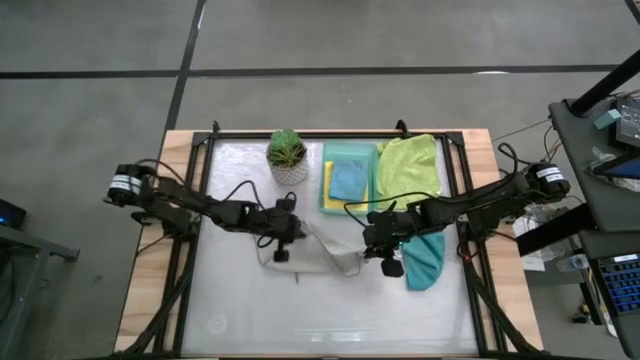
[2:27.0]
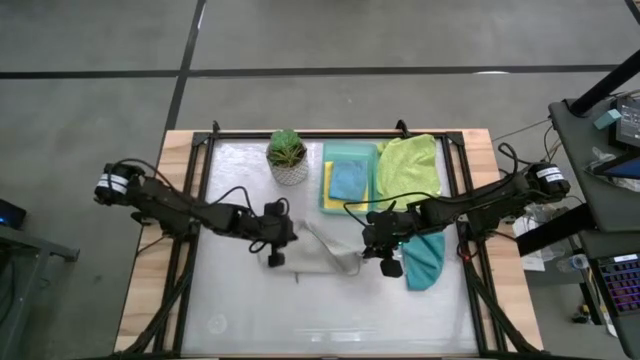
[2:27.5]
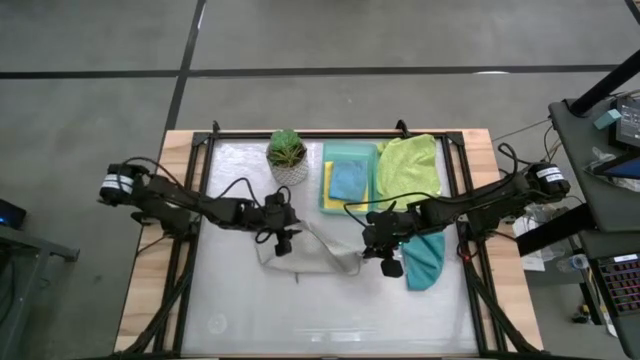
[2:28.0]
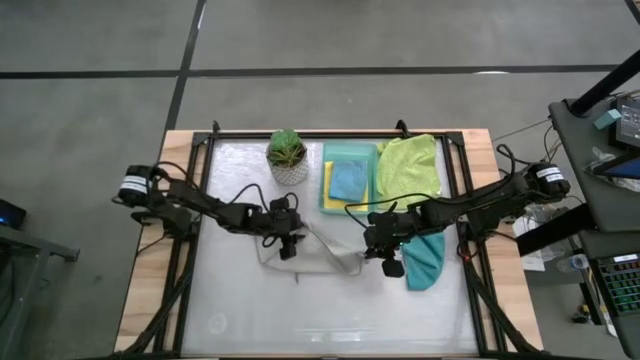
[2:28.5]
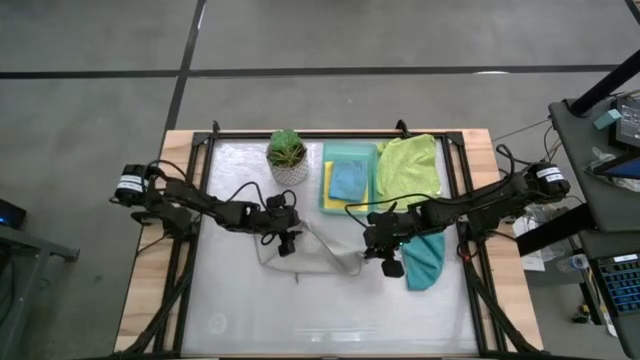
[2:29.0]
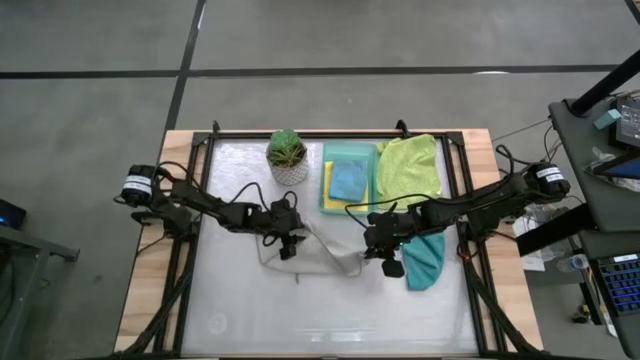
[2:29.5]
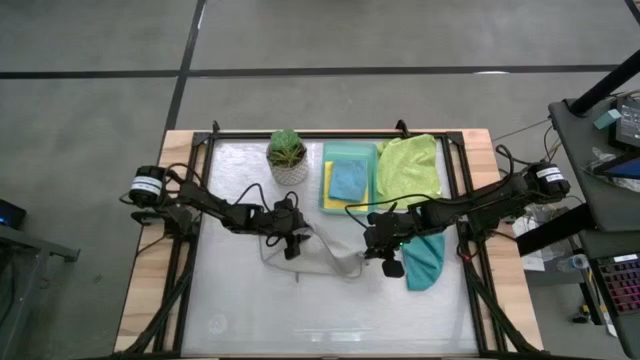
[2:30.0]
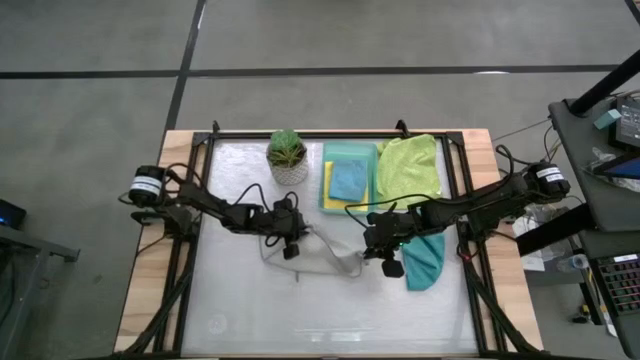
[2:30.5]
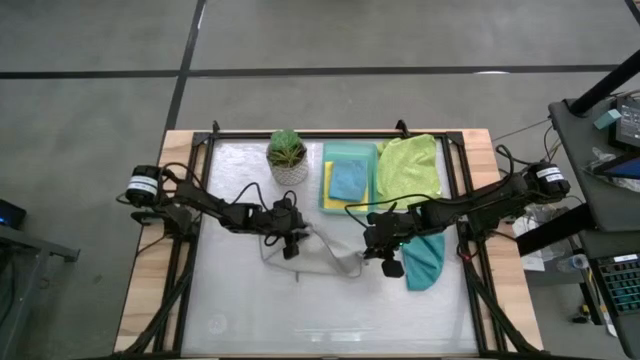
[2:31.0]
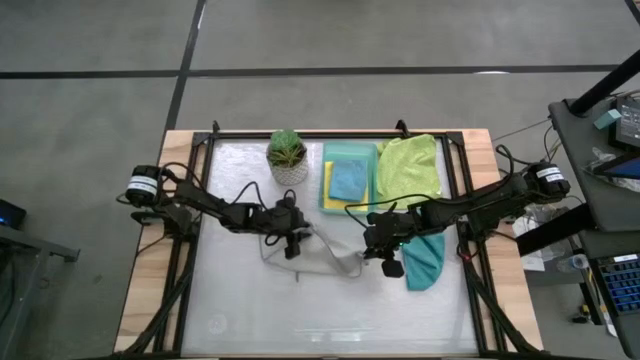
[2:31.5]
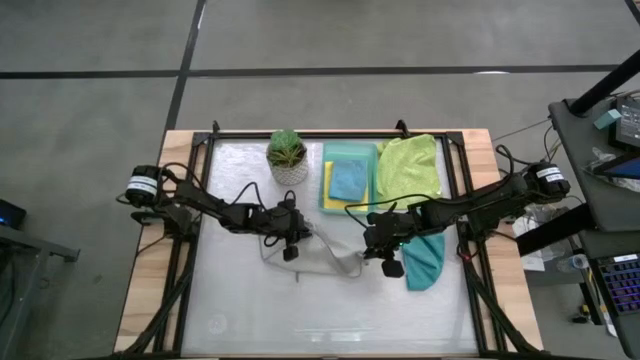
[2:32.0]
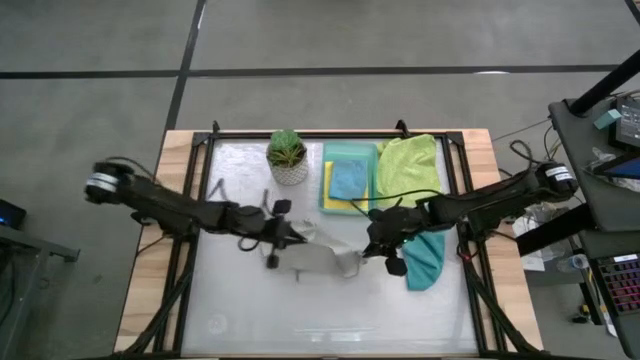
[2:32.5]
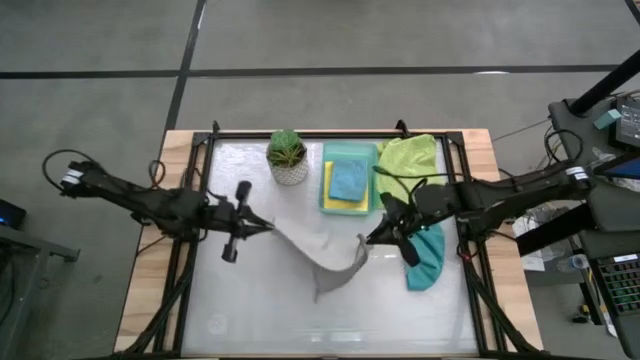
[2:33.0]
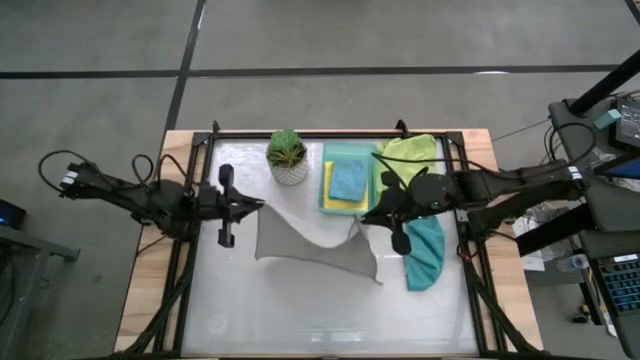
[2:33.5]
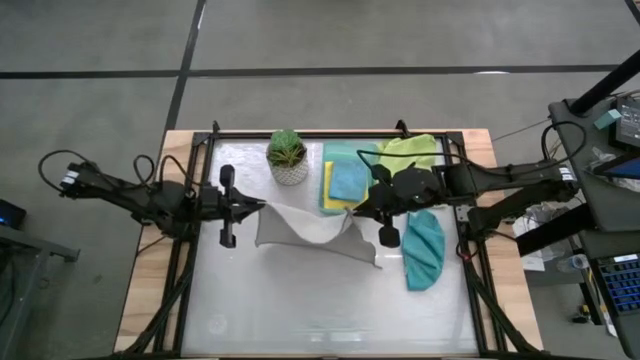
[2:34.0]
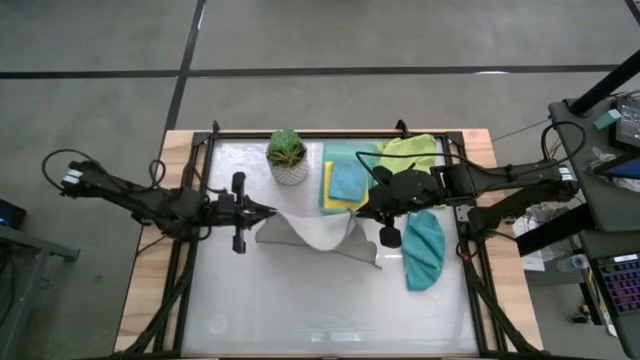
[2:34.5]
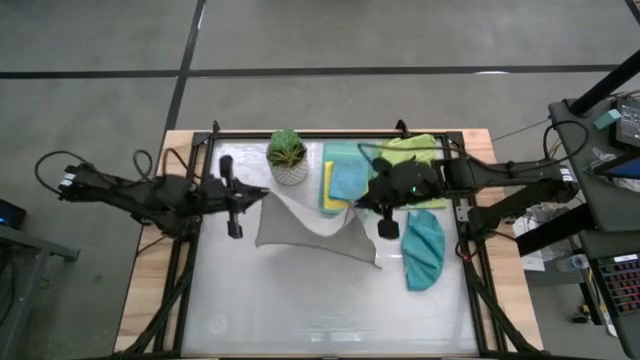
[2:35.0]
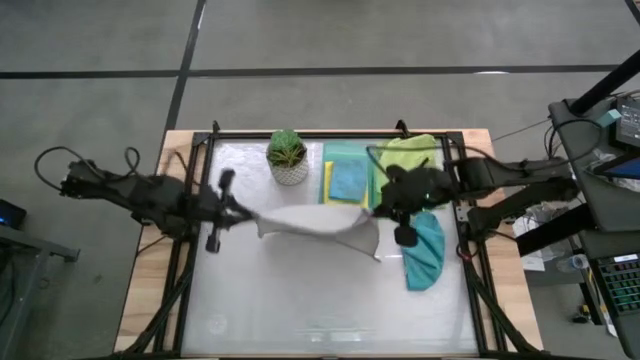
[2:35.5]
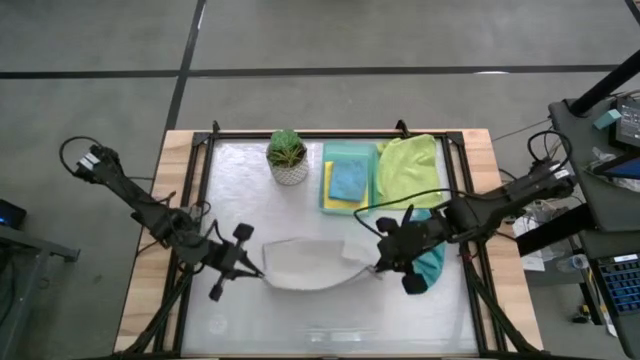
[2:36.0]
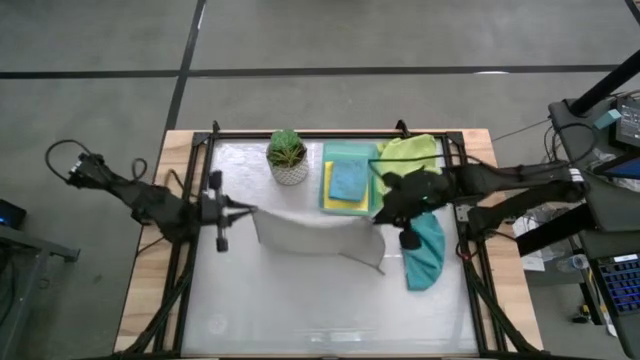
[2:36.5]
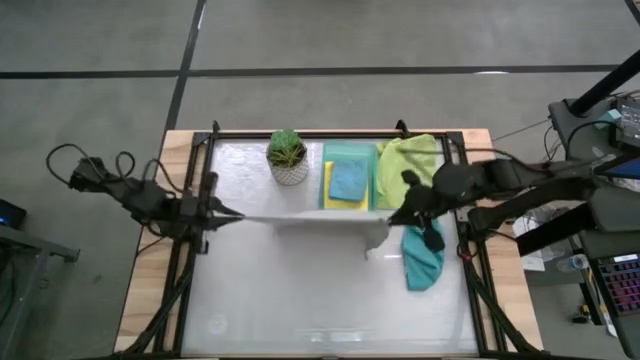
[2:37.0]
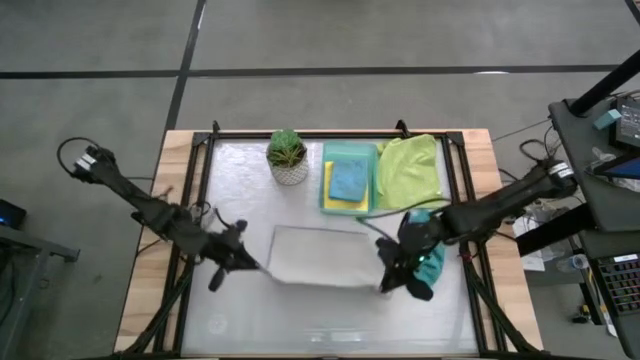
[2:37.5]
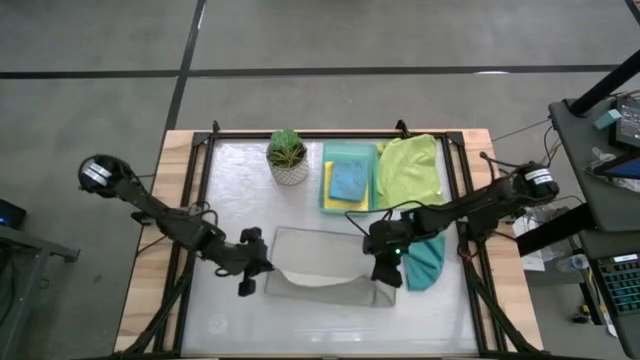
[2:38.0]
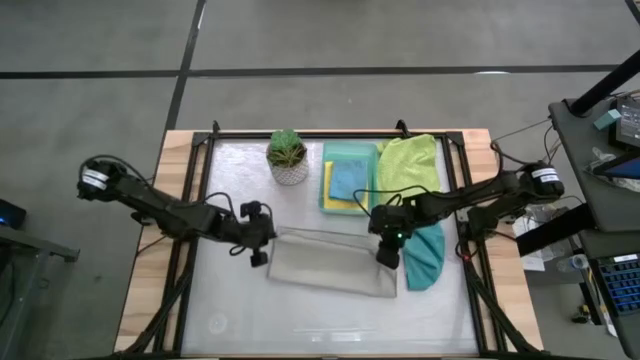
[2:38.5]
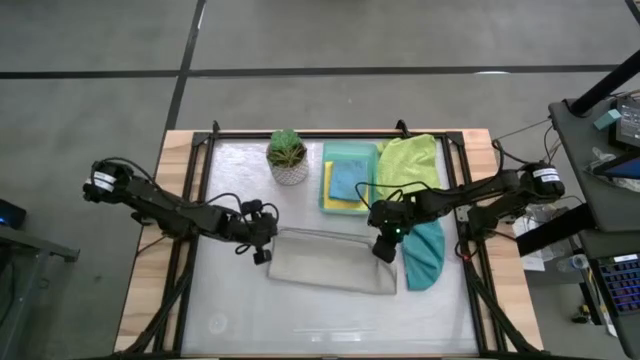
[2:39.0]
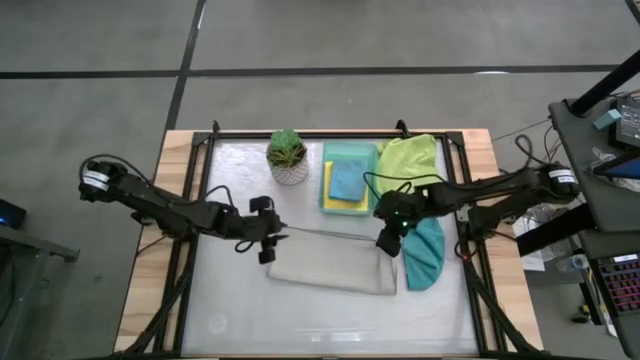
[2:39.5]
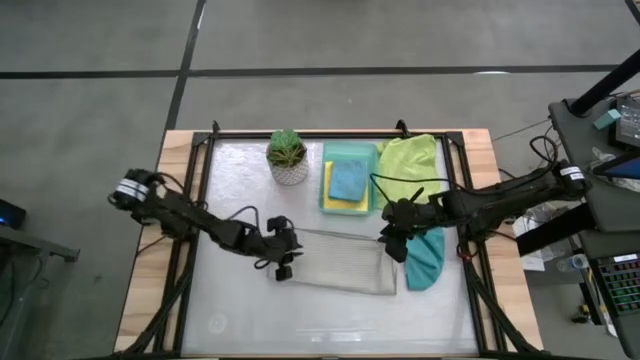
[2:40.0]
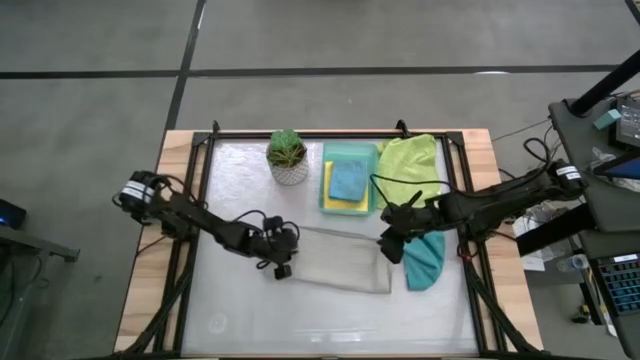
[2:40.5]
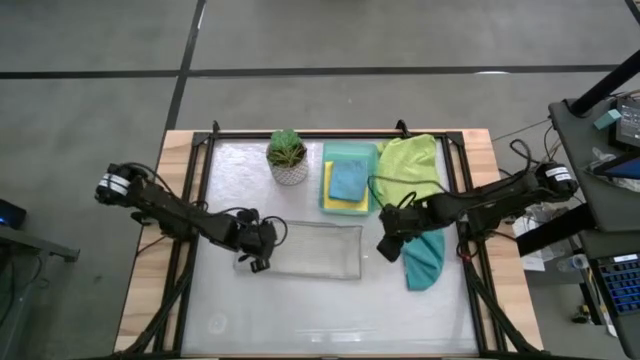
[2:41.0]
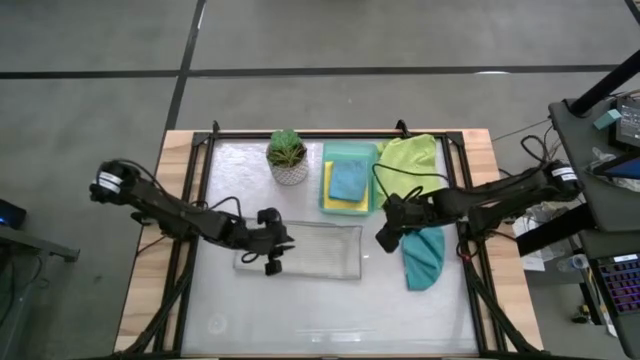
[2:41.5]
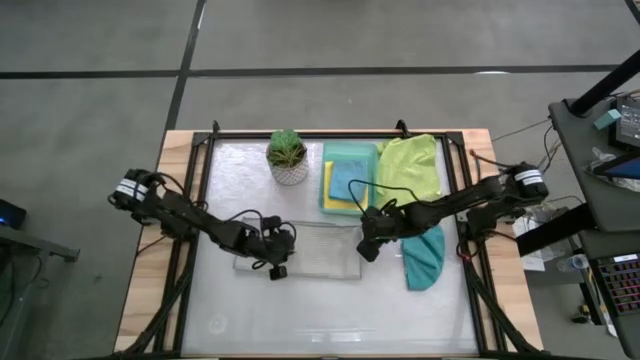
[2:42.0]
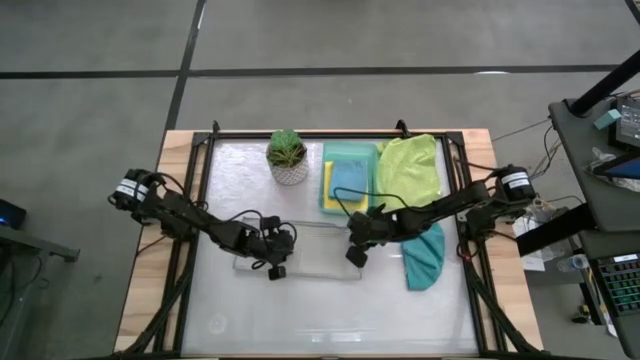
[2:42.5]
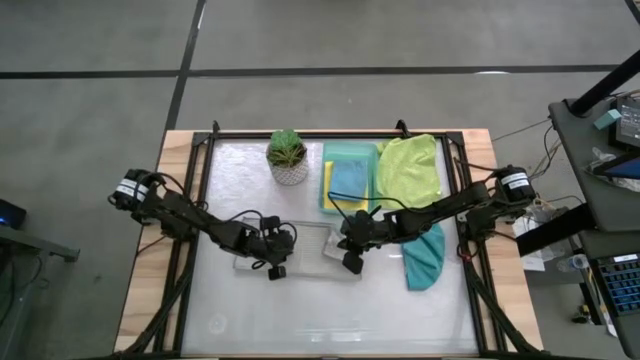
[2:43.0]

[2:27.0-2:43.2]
Task: Fold microfiber towels
Fold the gray microfiber cloth

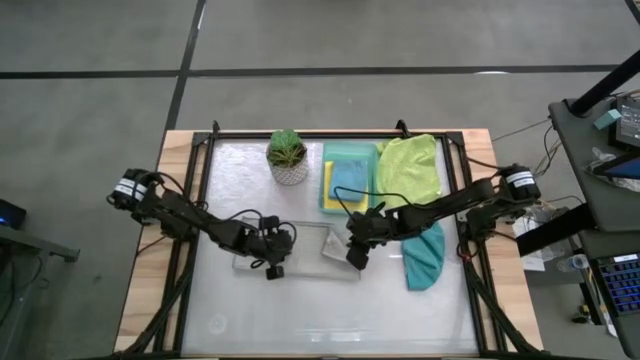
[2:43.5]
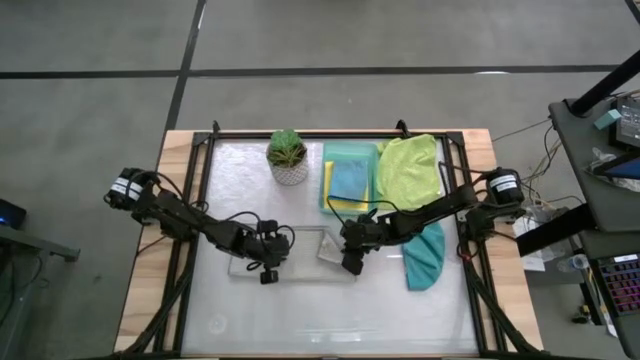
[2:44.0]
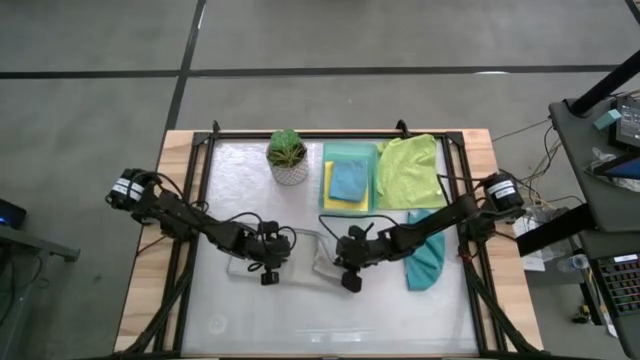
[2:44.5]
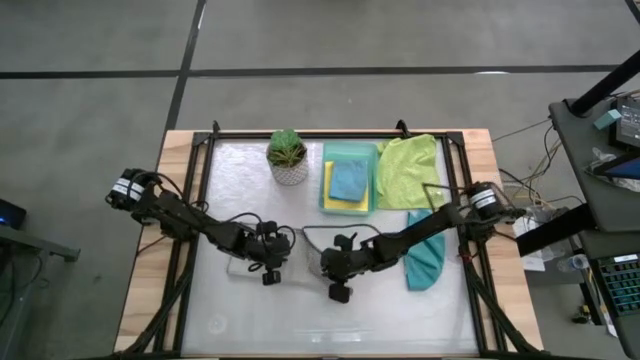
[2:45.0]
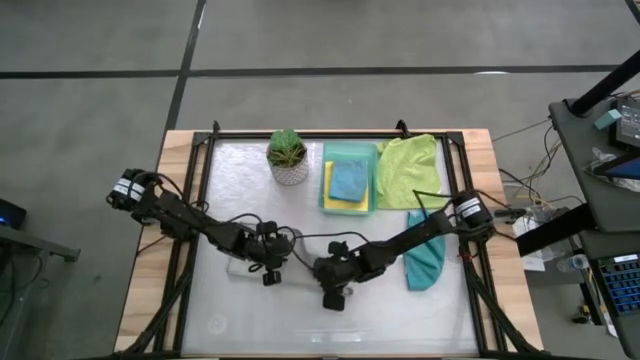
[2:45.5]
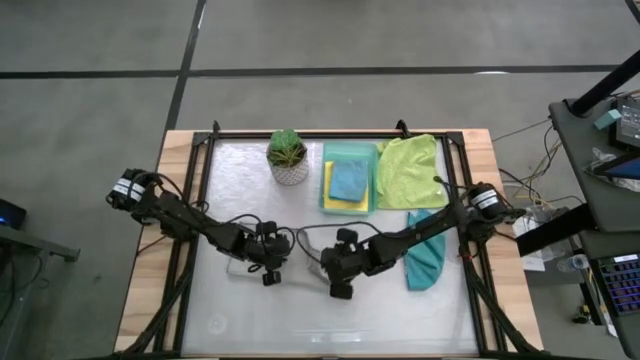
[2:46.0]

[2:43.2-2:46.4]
Fold the gray microfiber cloth

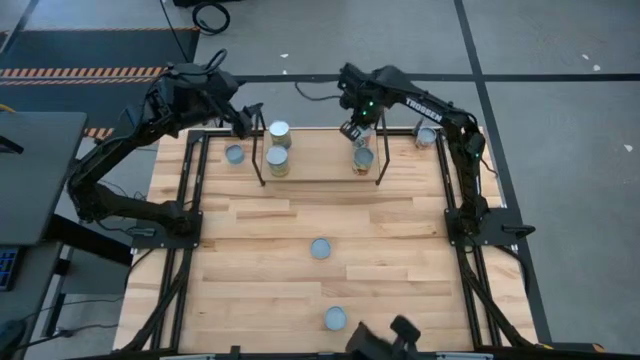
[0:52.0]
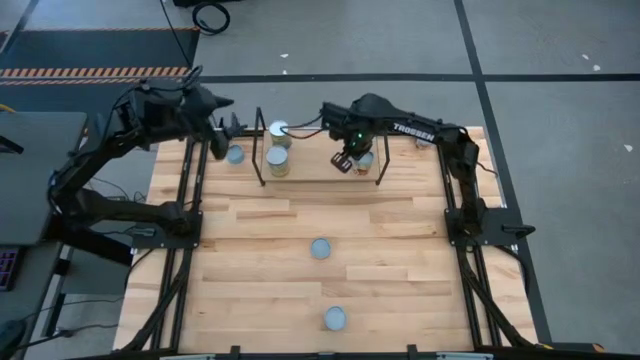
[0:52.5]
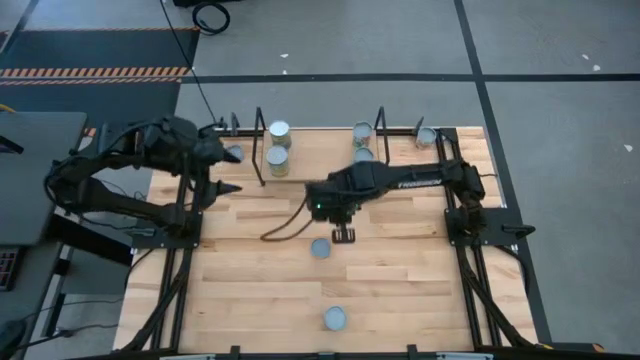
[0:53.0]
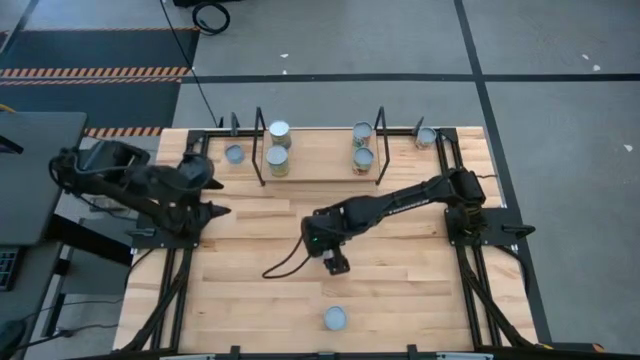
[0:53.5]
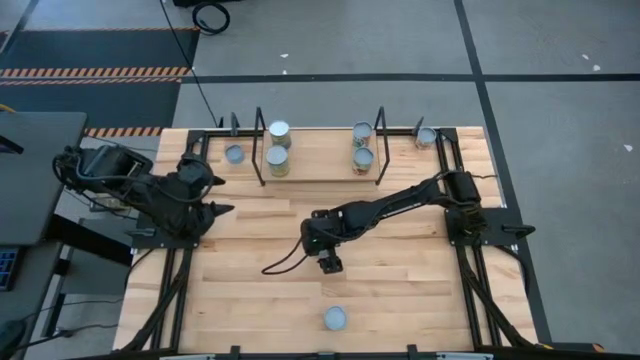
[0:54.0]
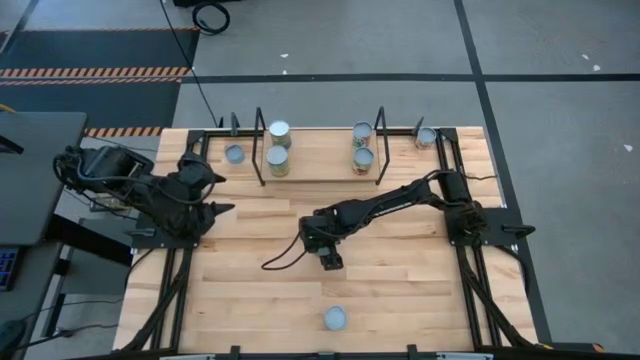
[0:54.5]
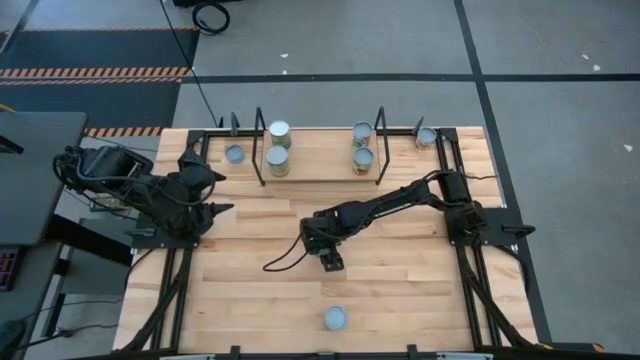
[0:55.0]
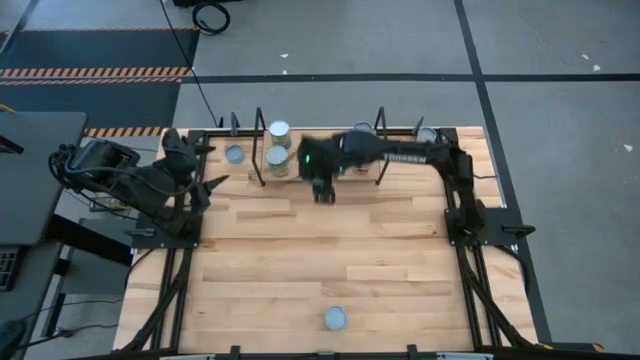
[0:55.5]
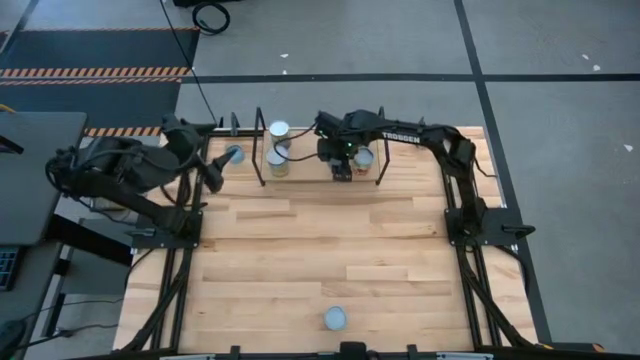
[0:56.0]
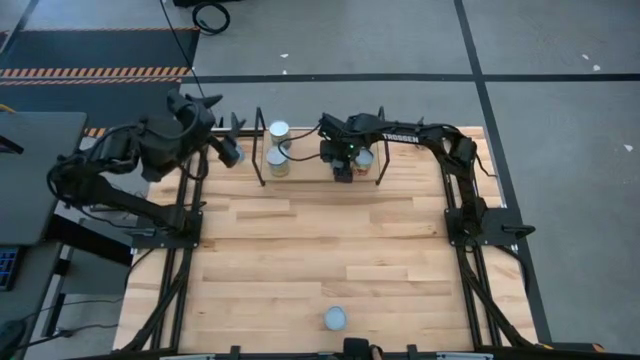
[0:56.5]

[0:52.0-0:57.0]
Task: Pick and place cans onto a shelf
Put the yellow can on the shelf aligned with the light green can
